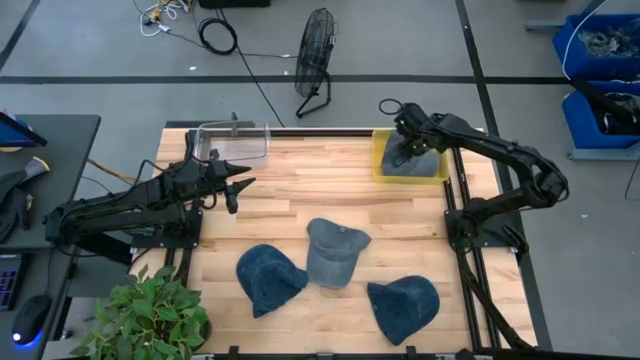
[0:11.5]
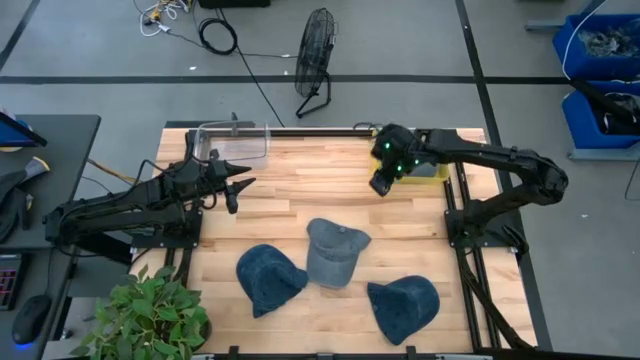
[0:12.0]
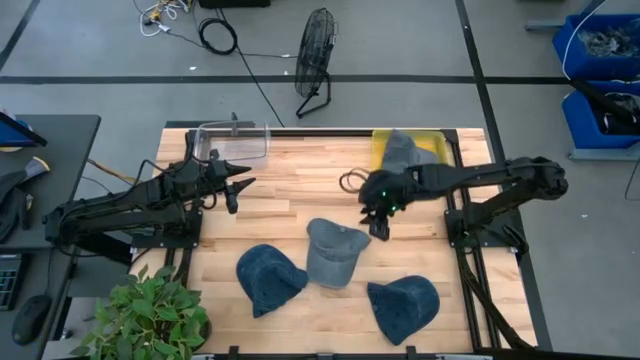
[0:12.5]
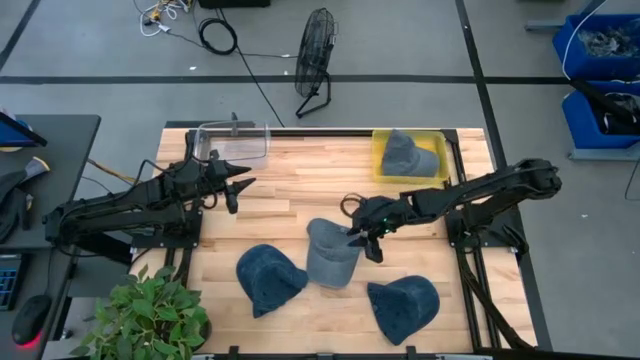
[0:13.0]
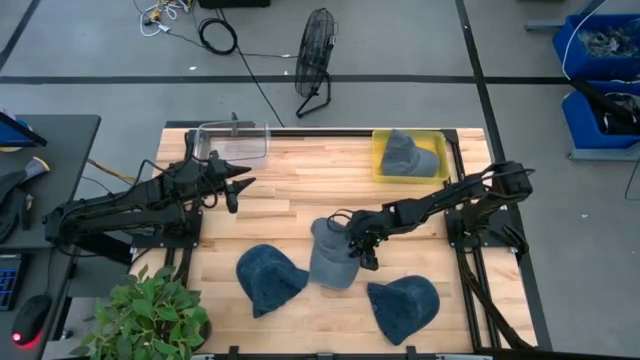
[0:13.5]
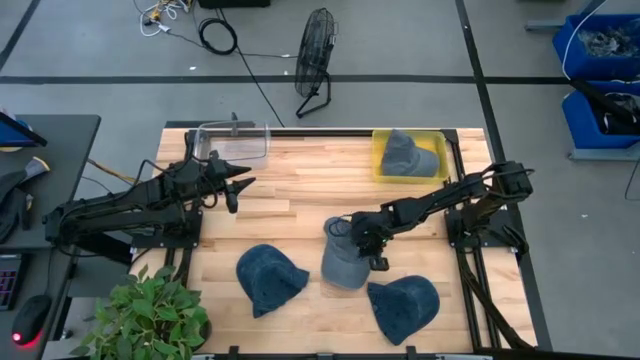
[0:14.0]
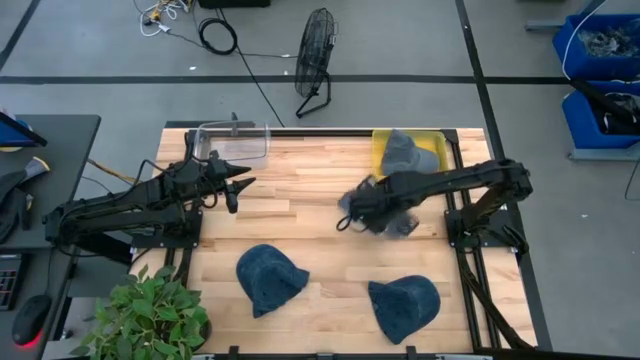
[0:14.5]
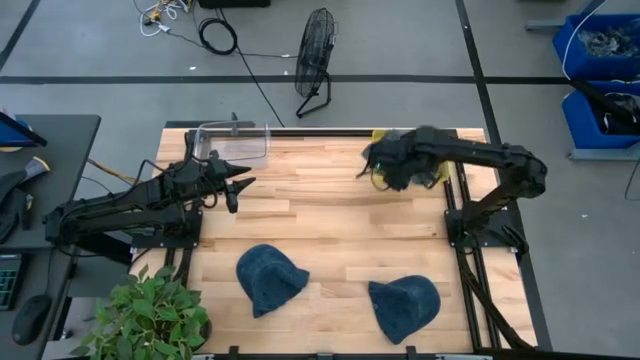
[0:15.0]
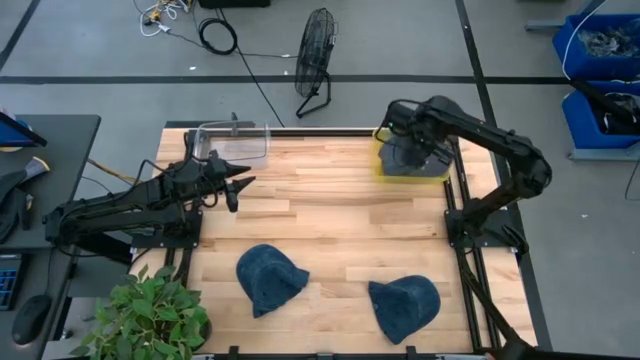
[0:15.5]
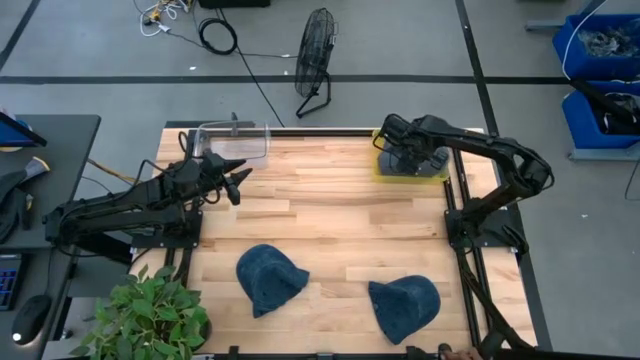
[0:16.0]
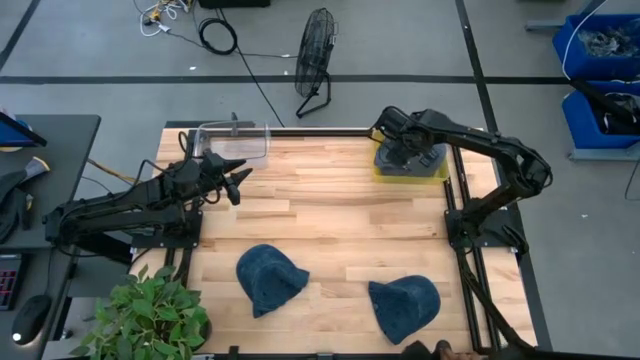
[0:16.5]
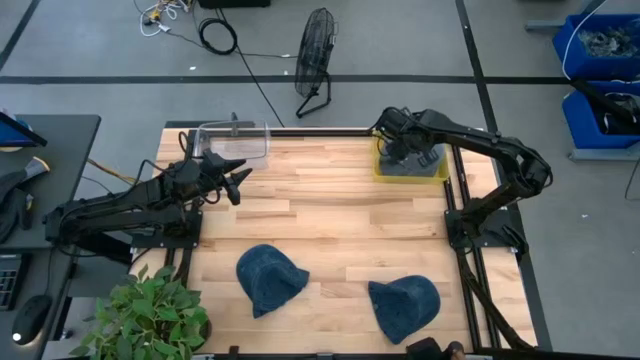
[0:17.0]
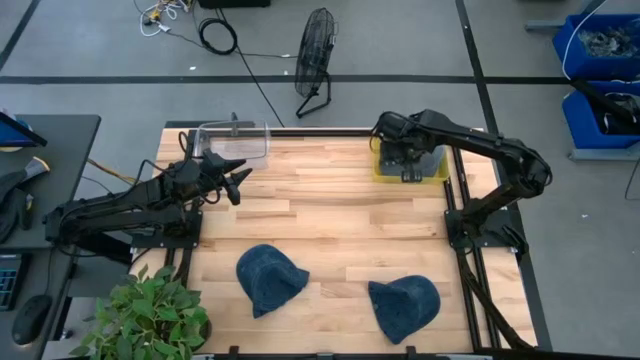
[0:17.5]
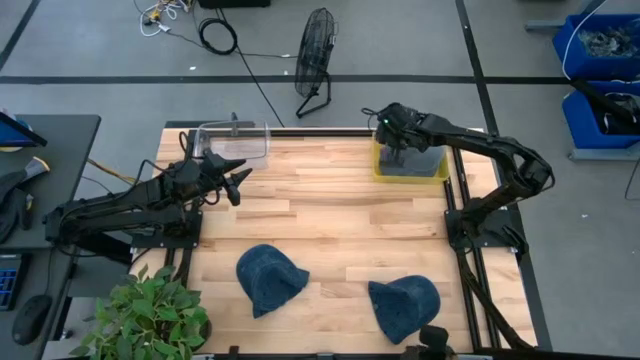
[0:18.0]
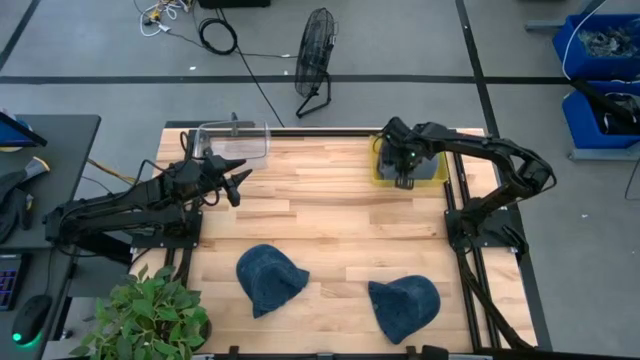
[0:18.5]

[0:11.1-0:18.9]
Task: Pick & Place hat
Put the black cap into the yellow bin

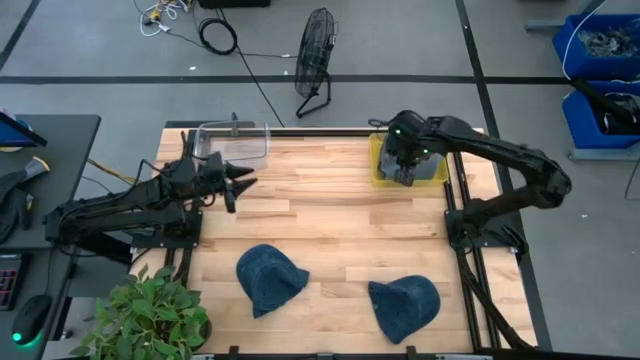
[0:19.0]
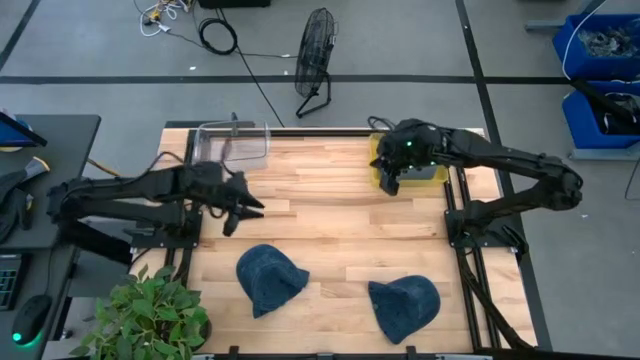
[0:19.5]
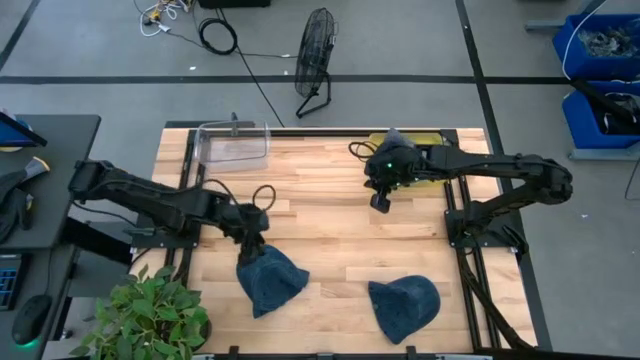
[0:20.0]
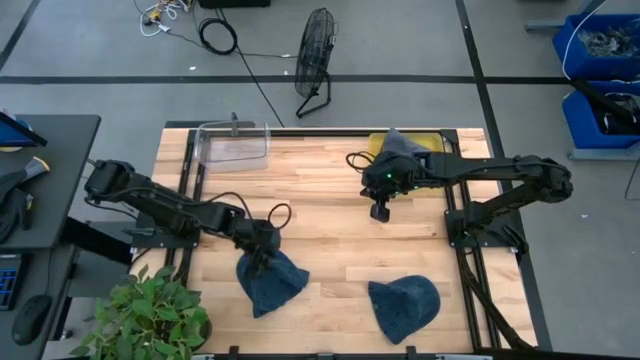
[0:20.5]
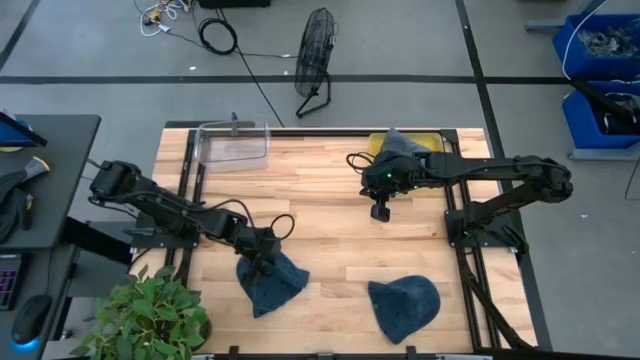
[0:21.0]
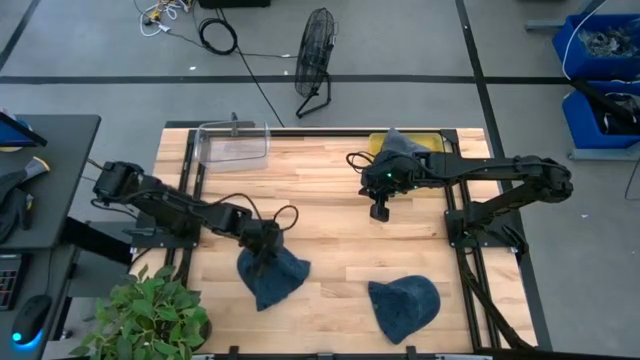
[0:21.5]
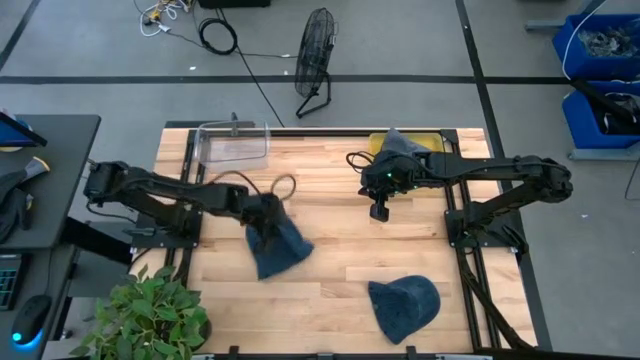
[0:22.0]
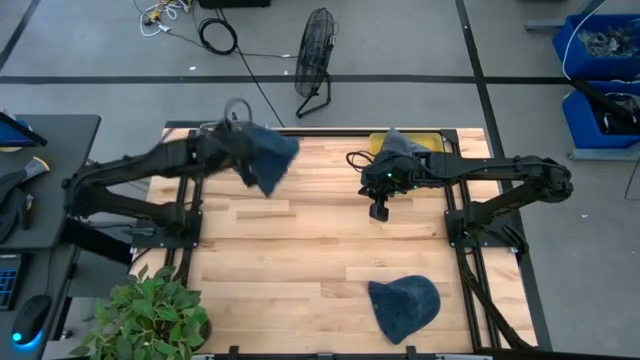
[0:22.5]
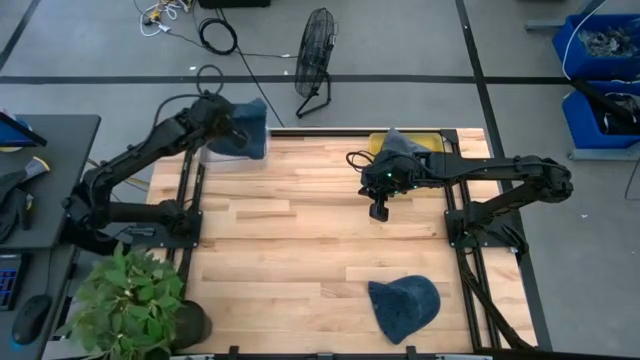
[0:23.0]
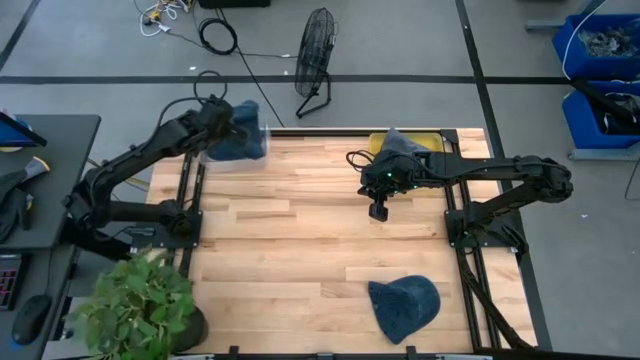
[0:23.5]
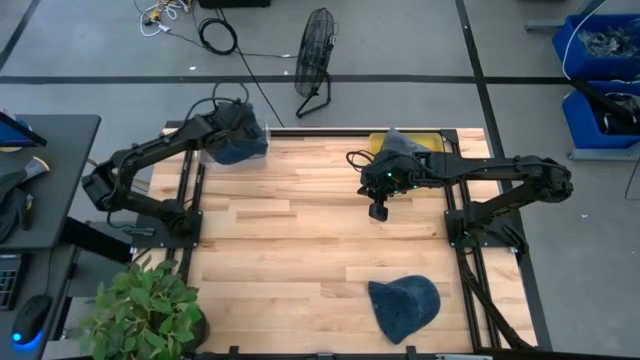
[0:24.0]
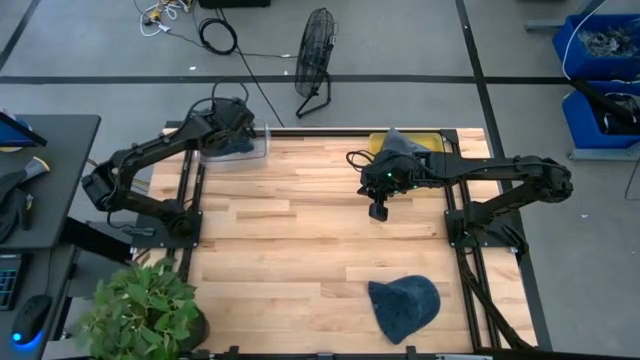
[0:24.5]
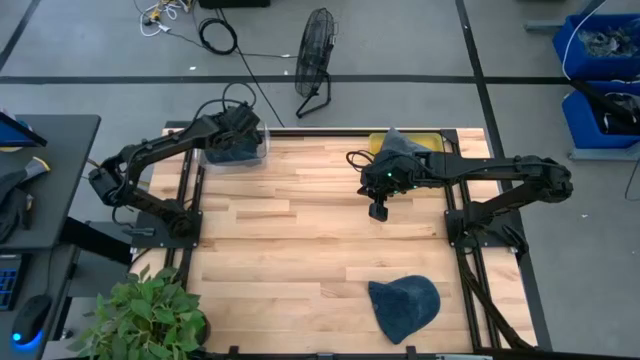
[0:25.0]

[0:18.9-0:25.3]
Put the left blue cap into the transparent bin

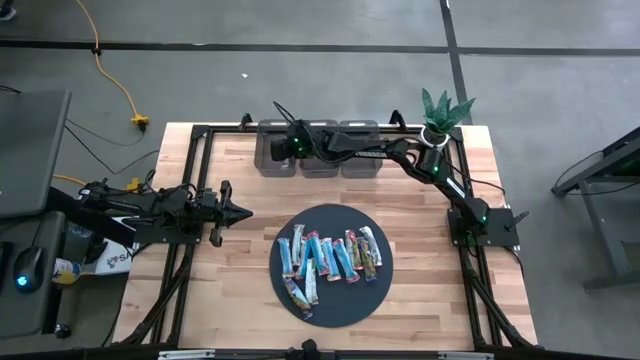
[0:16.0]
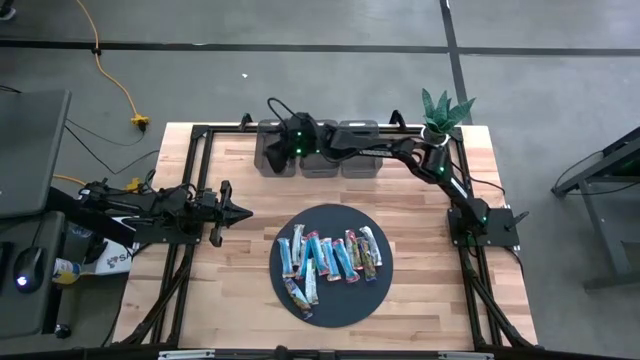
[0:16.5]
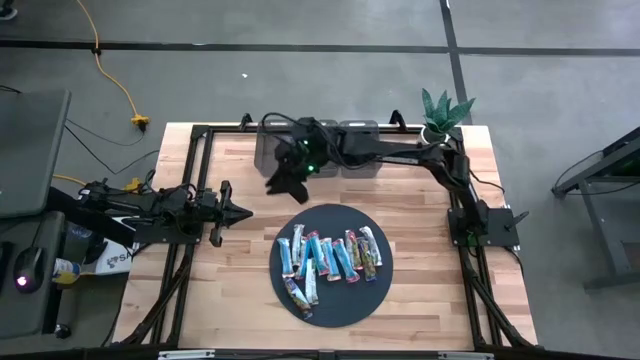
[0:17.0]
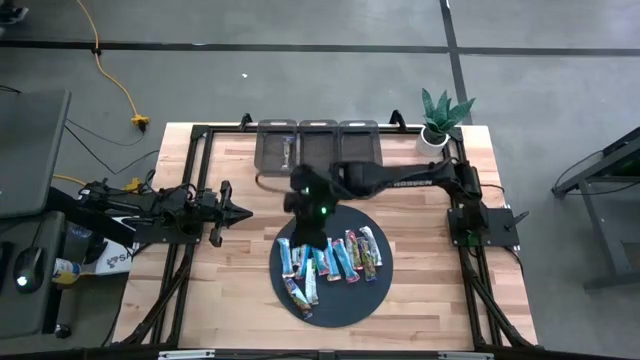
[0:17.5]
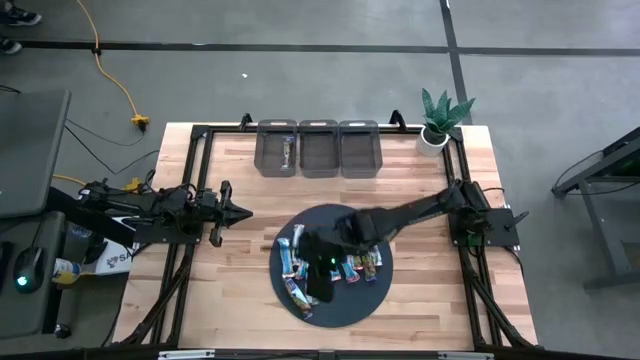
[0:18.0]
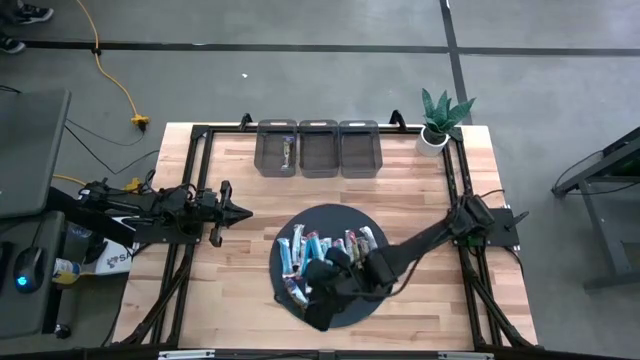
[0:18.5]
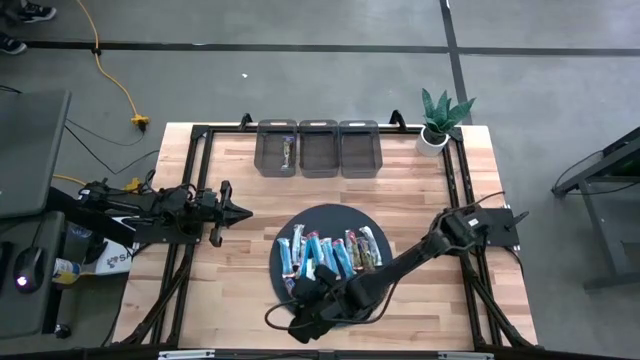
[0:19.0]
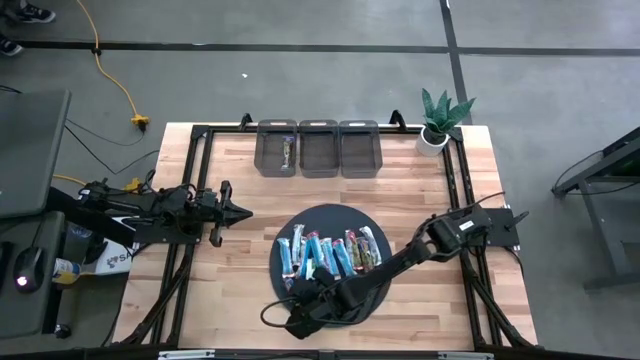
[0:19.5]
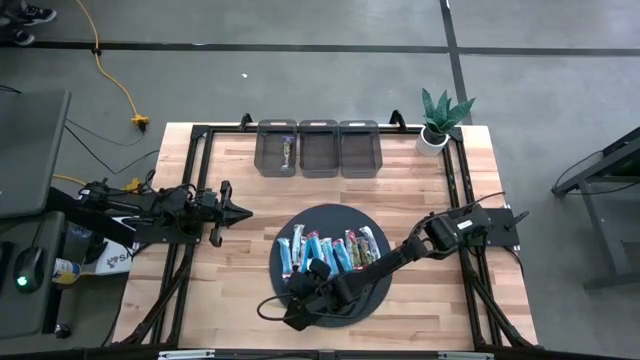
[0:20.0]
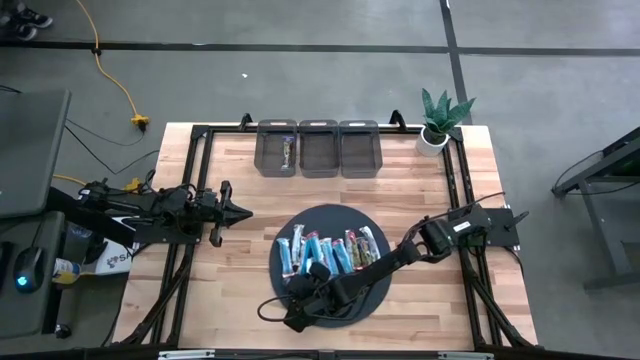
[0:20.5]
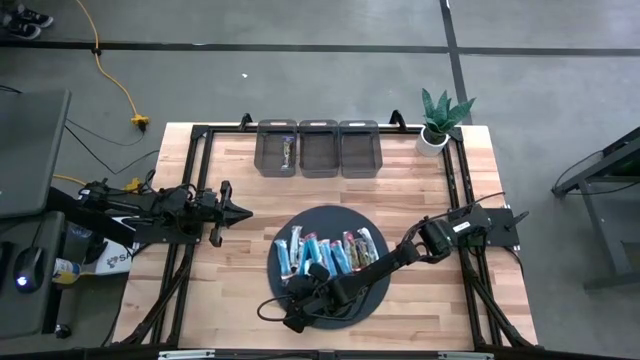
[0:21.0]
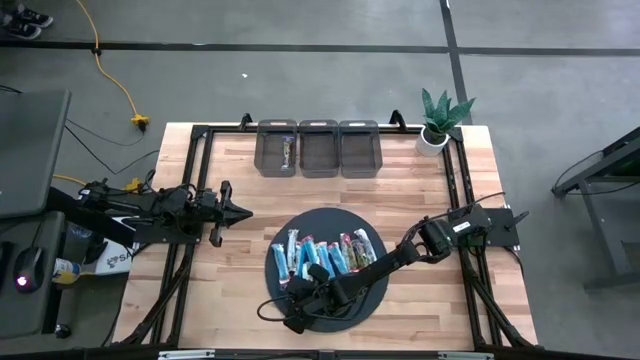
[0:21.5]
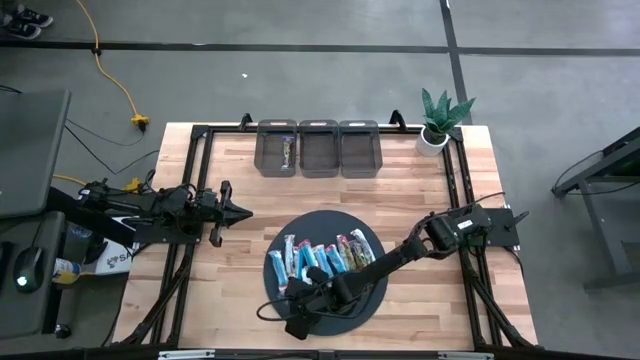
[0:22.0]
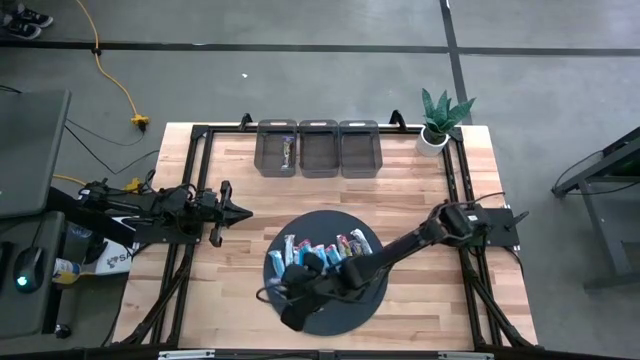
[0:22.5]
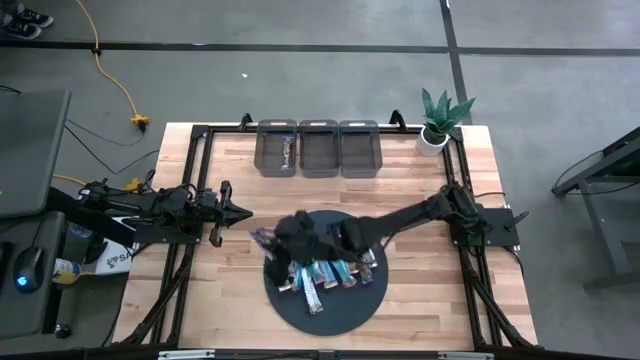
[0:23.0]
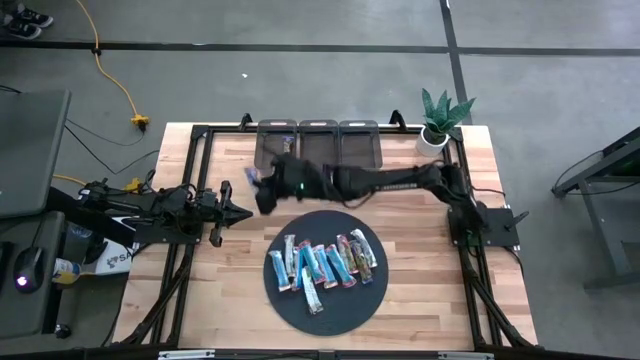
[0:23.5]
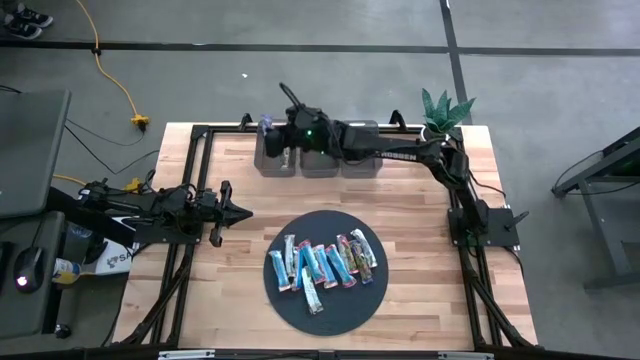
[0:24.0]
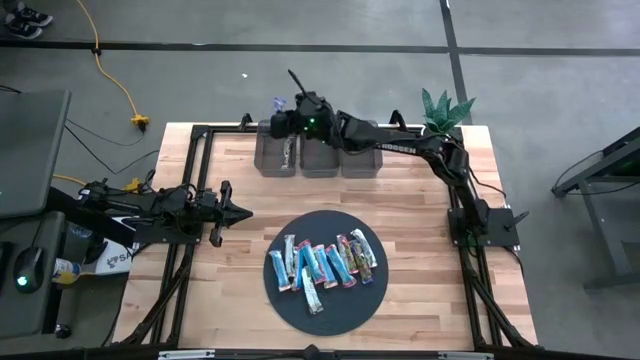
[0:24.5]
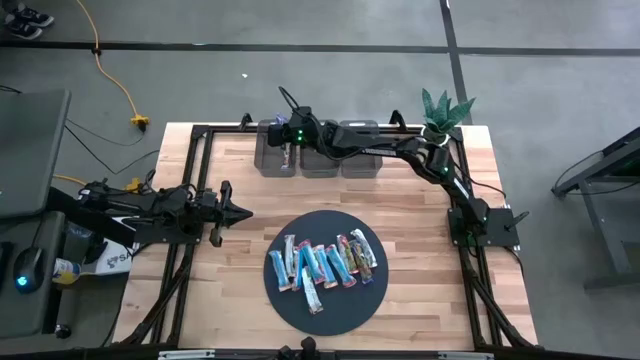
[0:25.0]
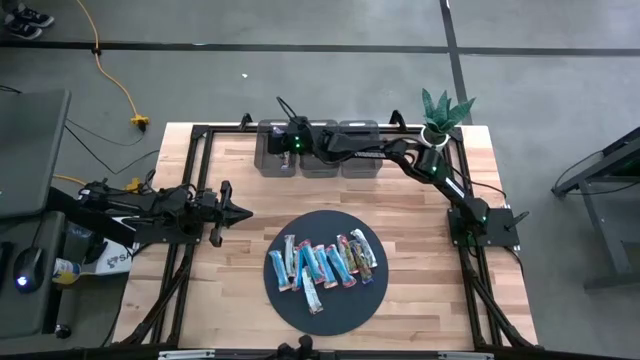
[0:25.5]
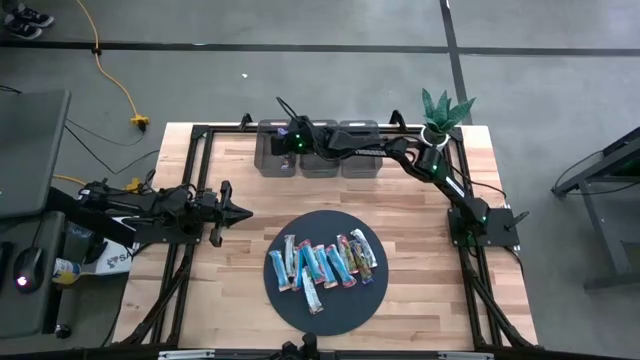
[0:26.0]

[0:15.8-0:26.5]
Task: Pick and place Granola Bars by type
Put the blue granola bar into the left black bin
